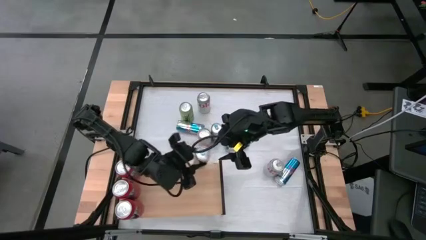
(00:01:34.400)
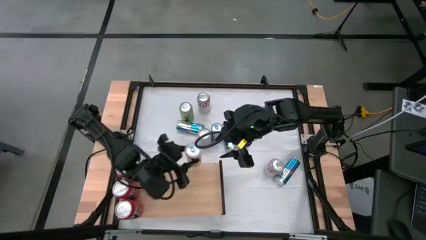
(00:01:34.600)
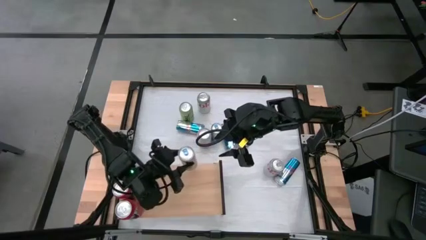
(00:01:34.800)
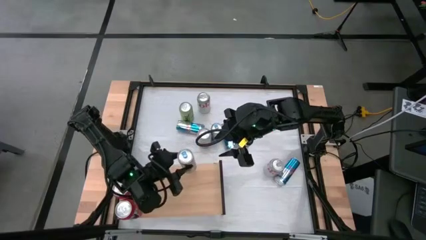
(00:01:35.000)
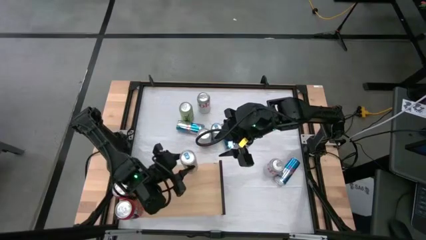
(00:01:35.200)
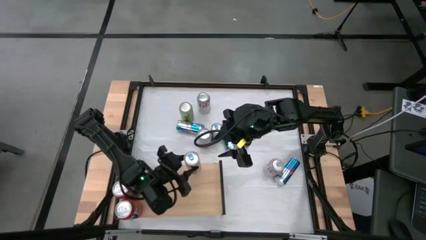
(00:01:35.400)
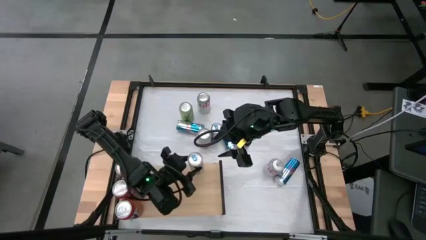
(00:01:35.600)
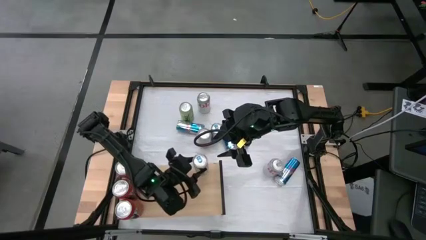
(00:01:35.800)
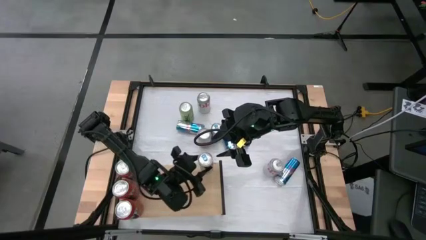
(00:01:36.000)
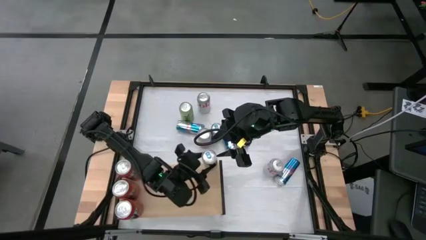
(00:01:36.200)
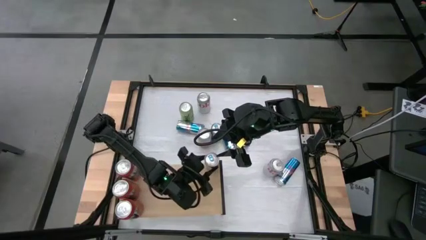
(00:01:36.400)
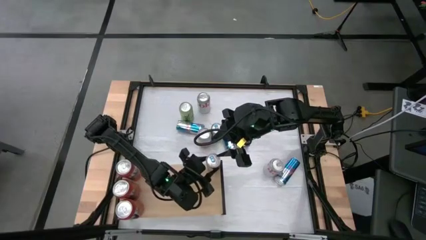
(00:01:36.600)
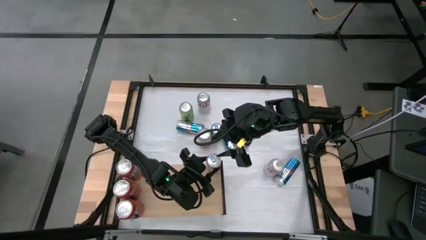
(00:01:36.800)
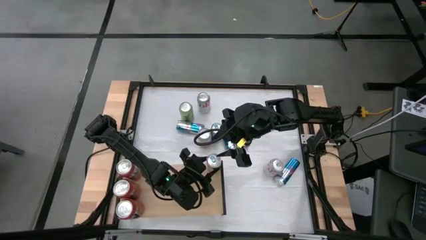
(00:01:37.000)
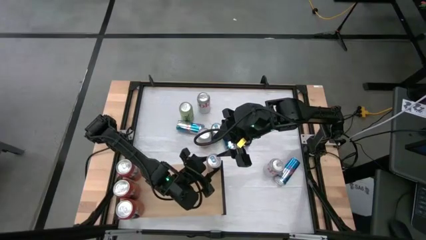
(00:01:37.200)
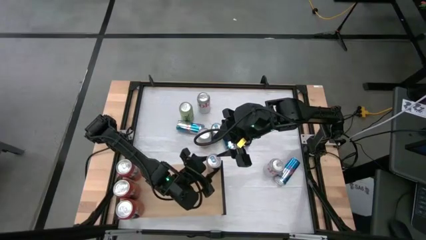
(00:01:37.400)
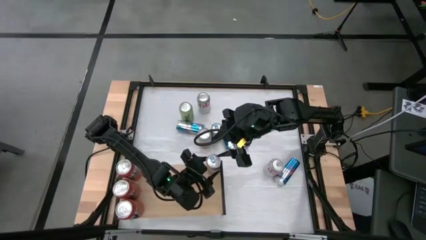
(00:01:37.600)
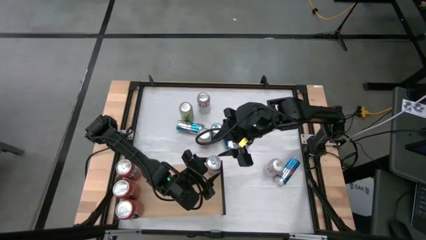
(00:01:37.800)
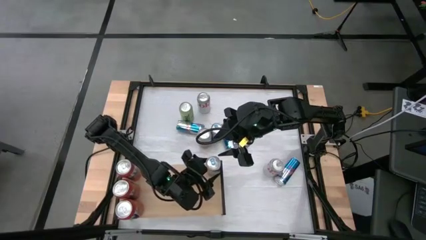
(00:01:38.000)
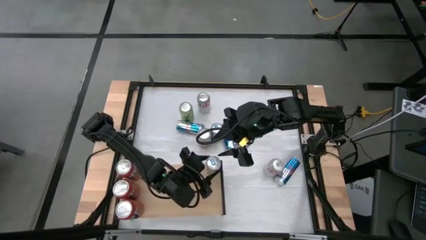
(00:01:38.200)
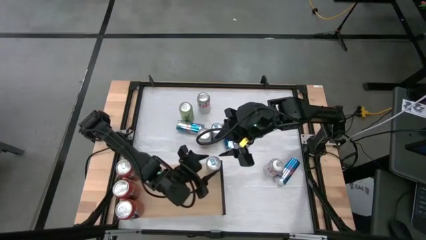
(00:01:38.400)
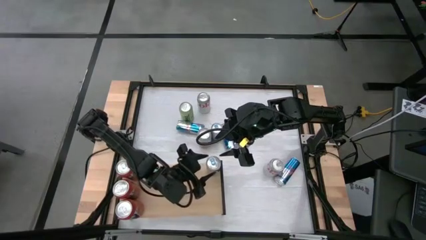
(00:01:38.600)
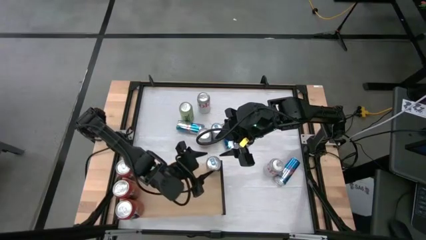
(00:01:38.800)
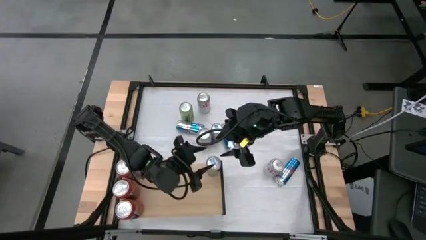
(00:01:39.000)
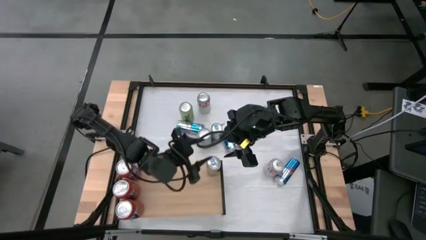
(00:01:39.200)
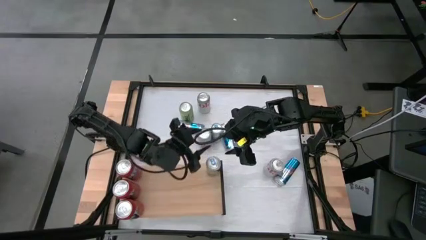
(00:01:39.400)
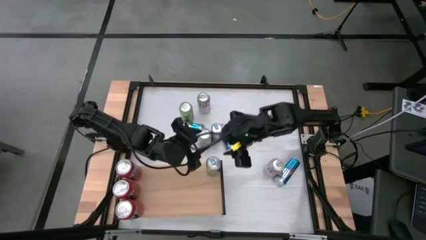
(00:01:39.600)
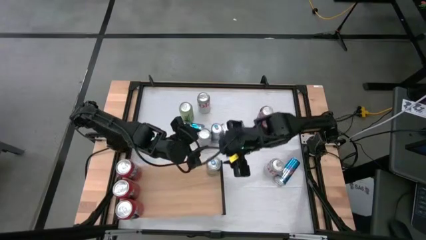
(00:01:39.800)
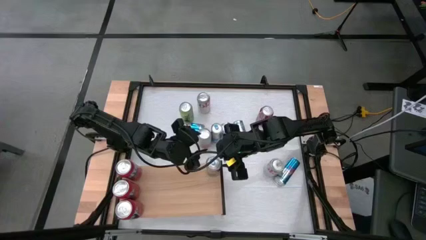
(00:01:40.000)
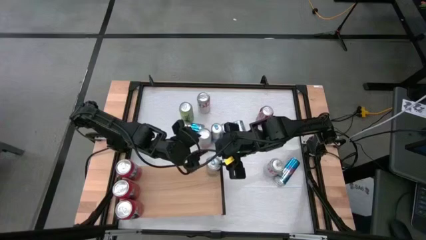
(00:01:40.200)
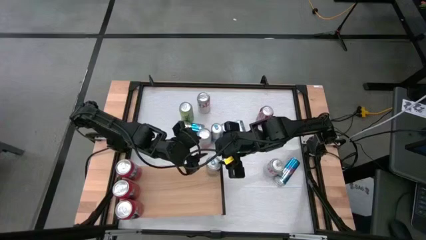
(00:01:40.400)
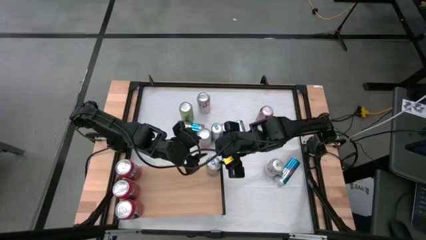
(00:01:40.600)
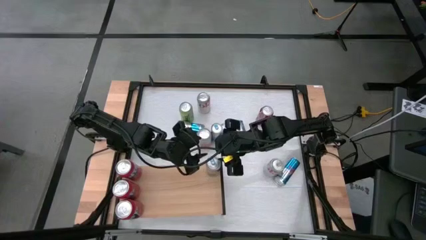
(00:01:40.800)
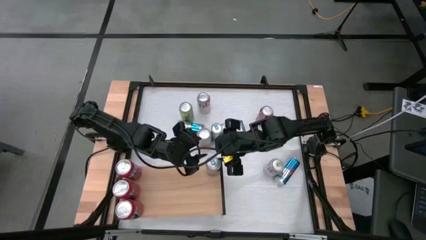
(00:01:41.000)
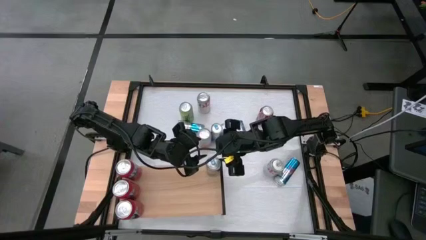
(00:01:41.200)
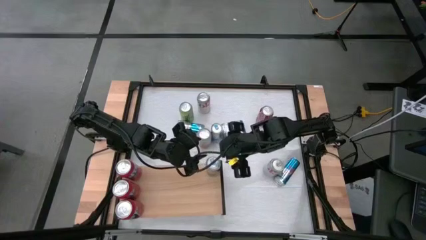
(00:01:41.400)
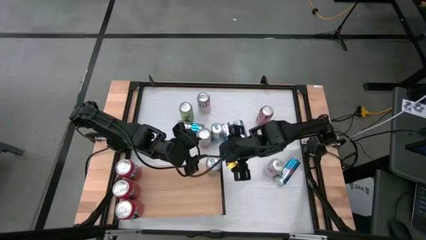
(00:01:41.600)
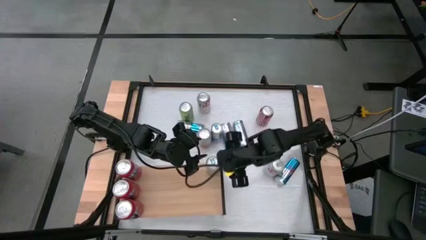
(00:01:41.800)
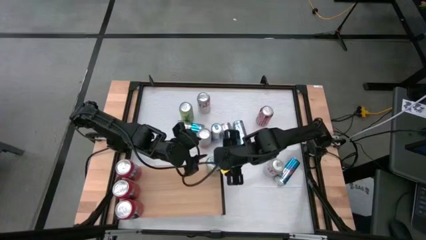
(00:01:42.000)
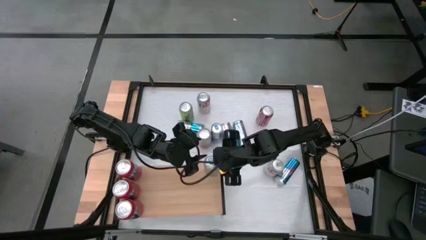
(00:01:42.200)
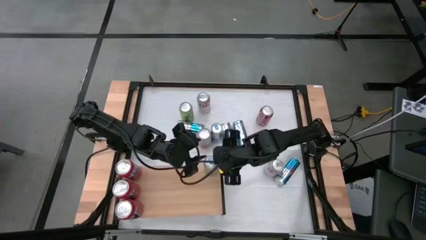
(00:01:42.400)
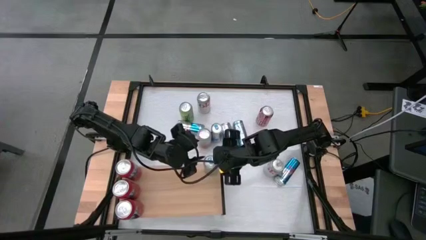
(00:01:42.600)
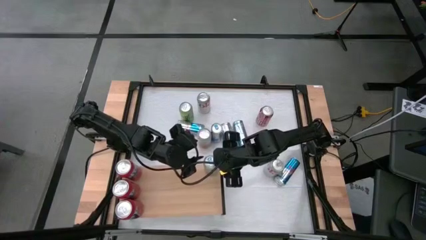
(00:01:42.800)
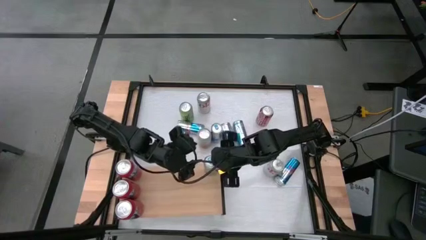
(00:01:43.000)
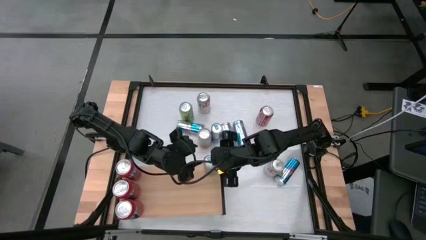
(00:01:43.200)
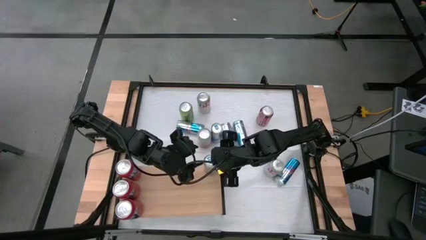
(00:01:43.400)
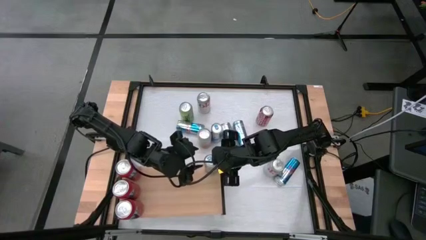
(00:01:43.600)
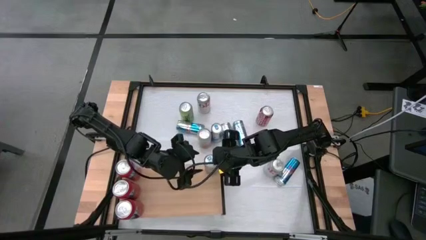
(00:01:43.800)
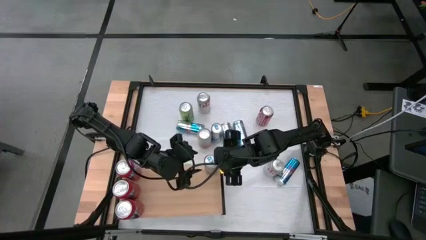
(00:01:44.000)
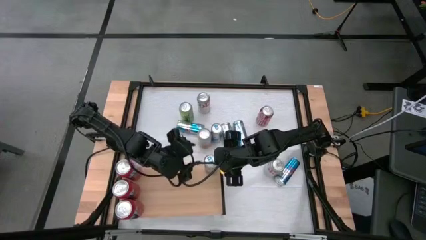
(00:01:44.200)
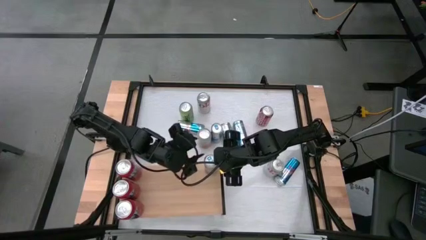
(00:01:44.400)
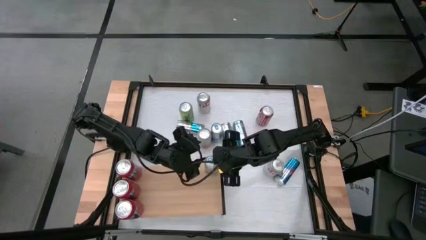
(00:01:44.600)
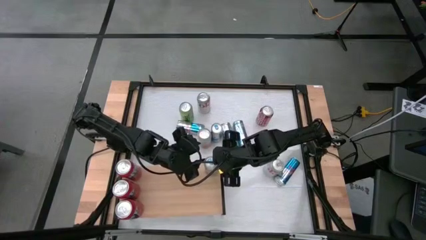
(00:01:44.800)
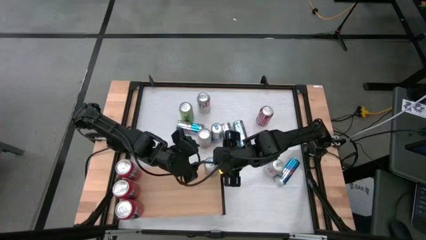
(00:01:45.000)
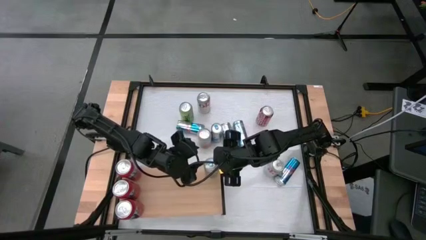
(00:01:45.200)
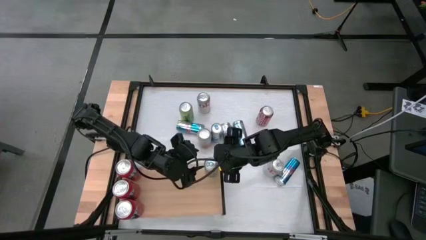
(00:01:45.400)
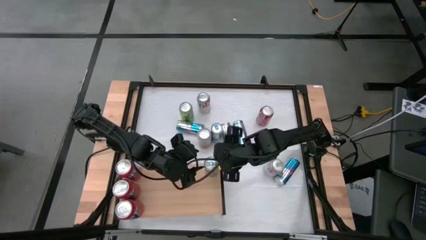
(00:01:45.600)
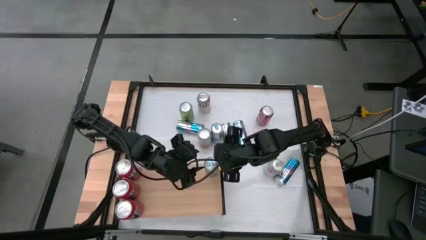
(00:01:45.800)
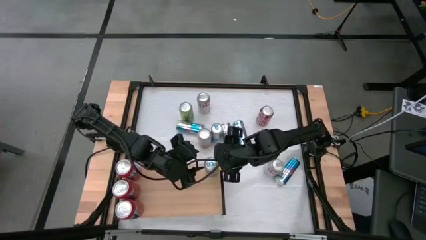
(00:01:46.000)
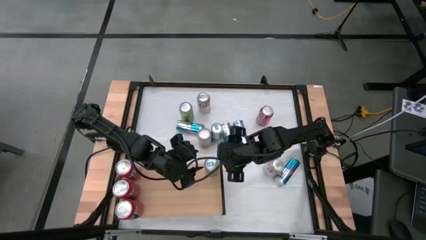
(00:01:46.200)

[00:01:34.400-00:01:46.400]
Task: Place canned beverage on shelf
Put the blue soda can on the shelf

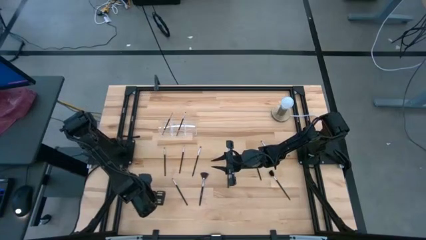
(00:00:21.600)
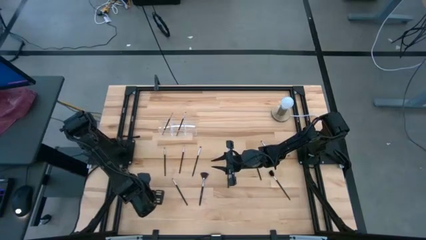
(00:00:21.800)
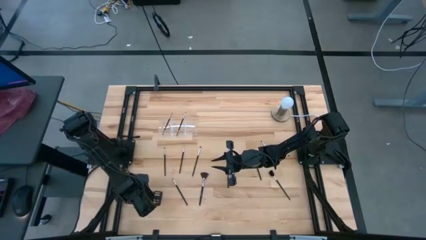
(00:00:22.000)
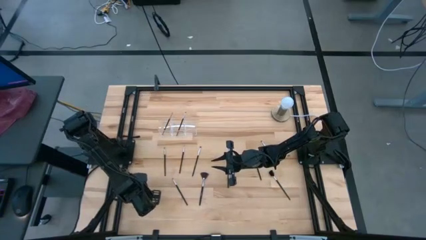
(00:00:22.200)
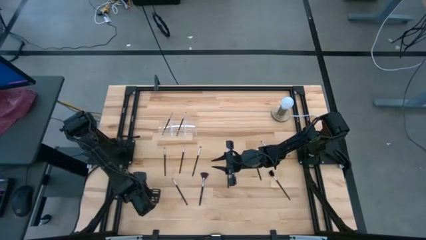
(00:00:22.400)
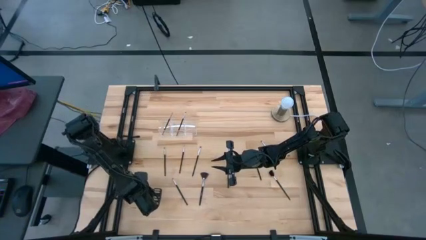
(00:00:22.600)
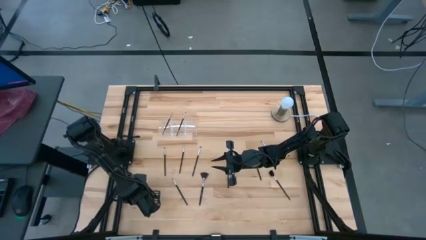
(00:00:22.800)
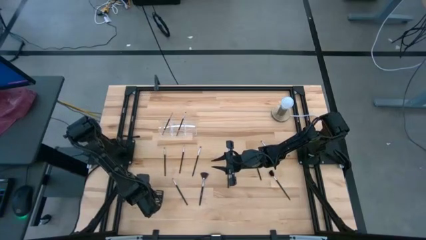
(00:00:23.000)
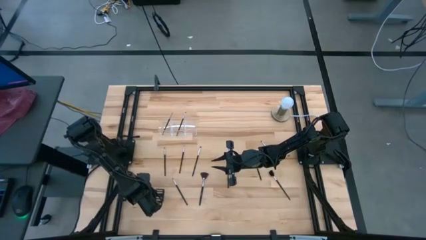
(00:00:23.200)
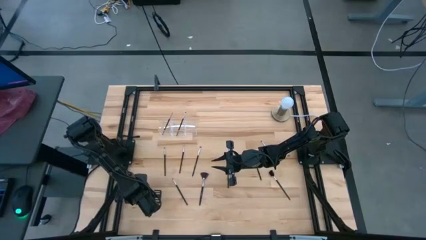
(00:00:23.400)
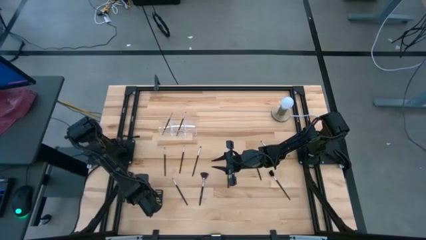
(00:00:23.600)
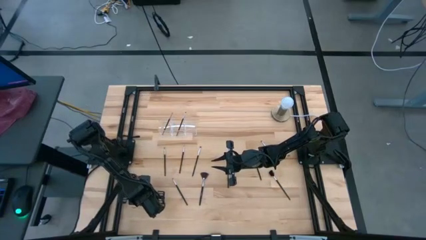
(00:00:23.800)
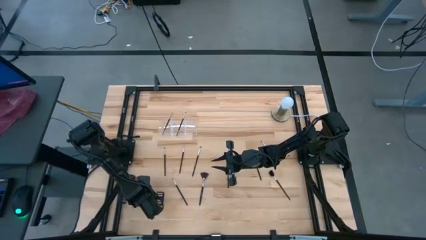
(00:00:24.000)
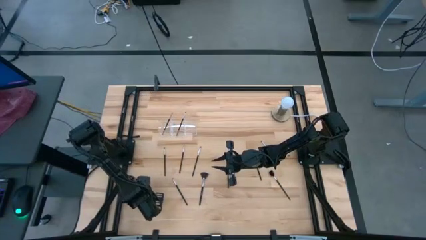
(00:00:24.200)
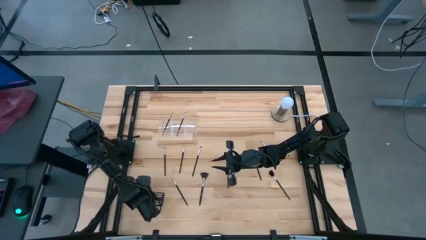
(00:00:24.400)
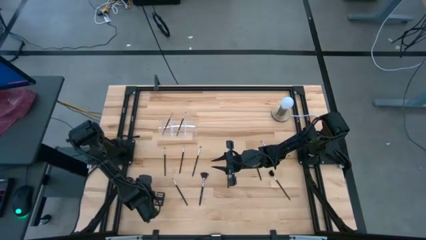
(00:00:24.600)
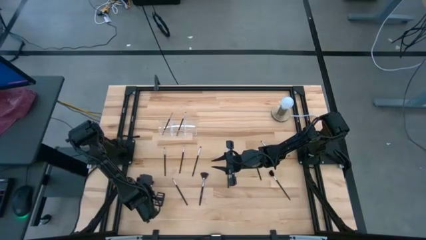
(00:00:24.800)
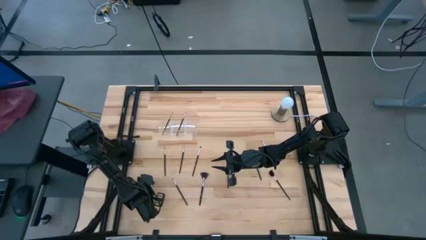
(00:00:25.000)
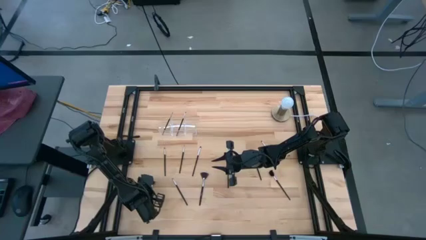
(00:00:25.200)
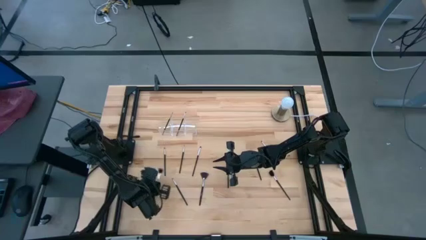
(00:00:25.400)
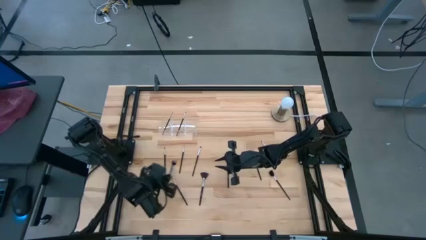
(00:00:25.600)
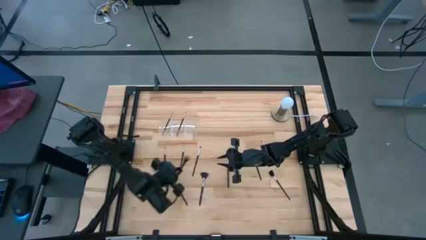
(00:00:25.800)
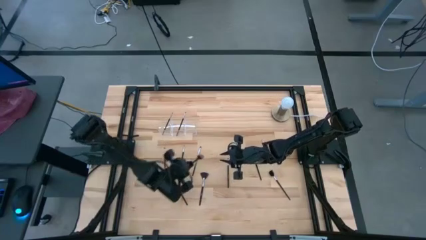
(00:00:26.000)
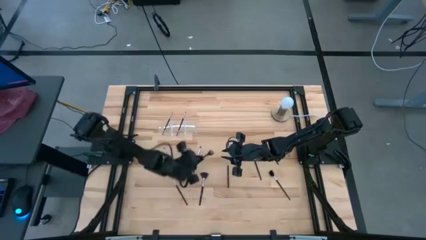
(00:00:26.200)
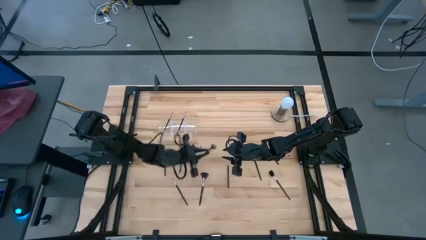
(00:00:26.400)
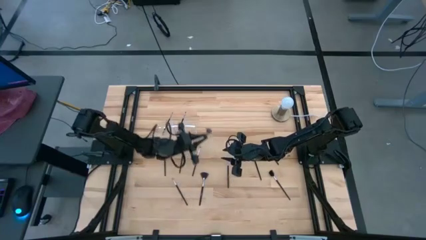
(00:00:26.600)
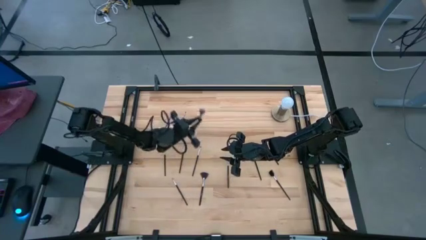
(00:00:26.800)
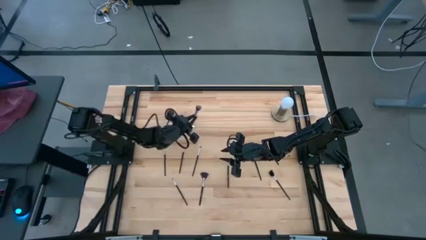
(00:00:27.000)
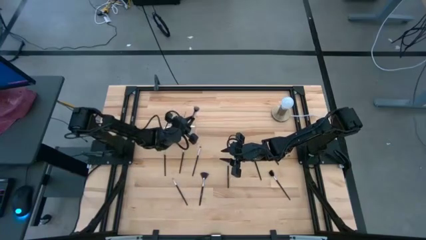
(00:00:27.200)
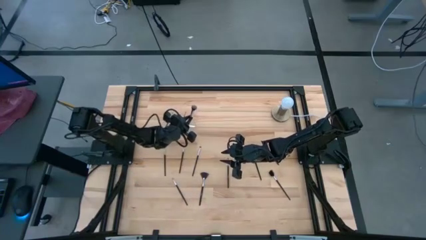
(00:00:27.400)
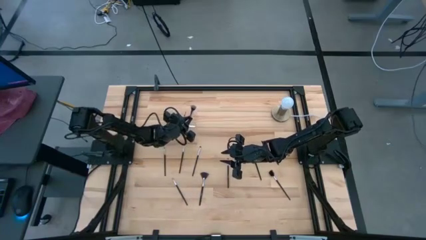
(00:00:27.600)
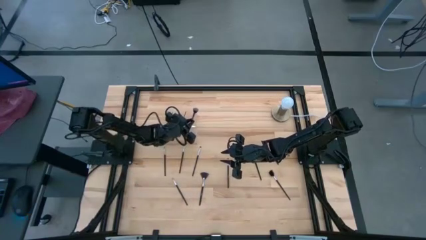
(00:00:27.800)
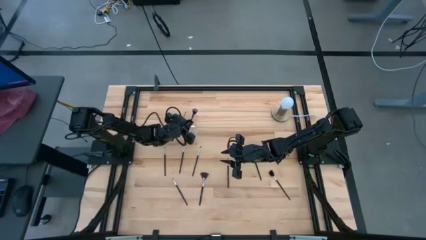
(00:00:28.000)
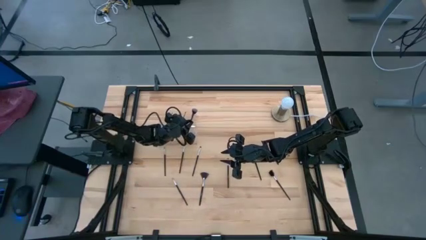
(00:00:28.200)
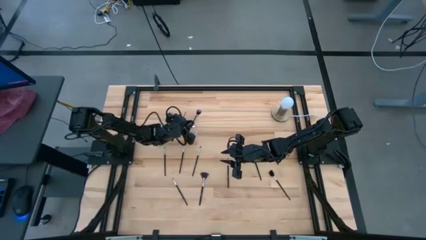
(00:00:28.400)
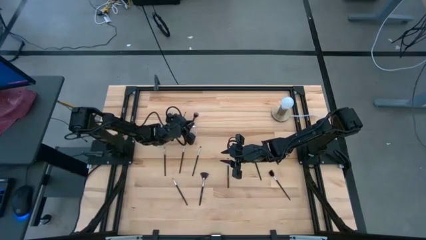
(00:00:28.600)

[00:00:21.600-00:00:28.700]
Task: Pick & Place Makeup Brushes
Put the black powder brush into the transparent organizer
